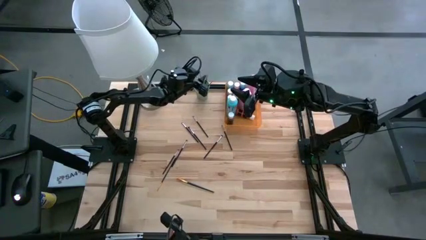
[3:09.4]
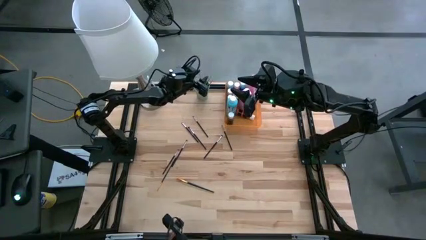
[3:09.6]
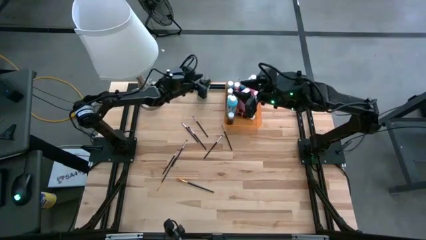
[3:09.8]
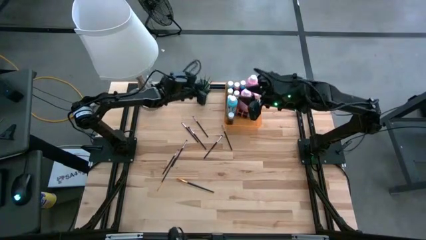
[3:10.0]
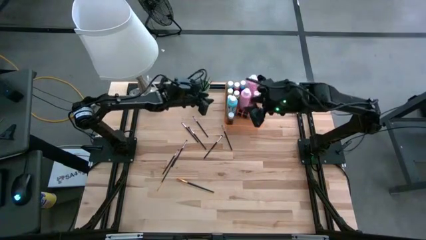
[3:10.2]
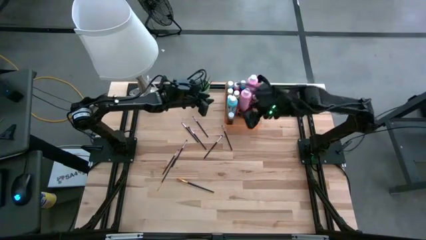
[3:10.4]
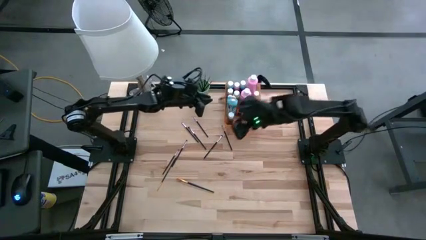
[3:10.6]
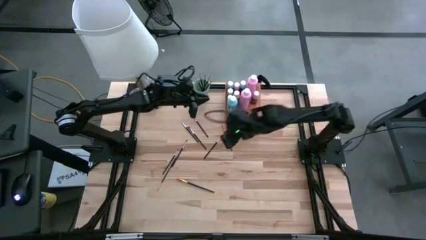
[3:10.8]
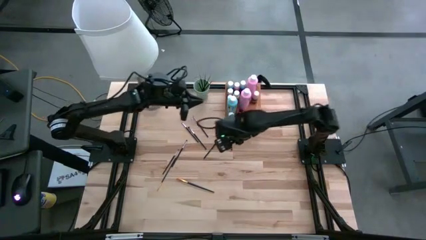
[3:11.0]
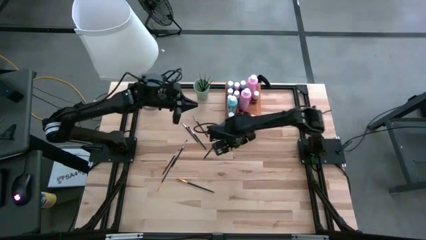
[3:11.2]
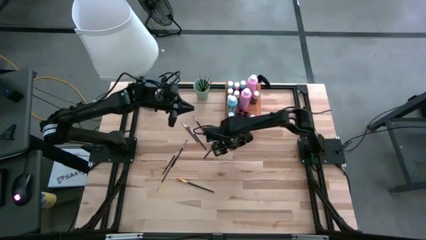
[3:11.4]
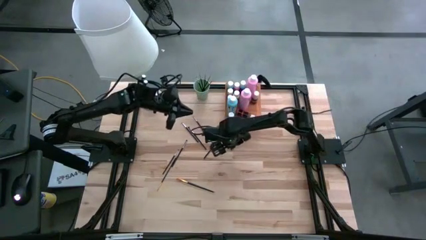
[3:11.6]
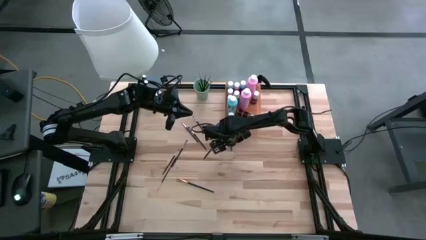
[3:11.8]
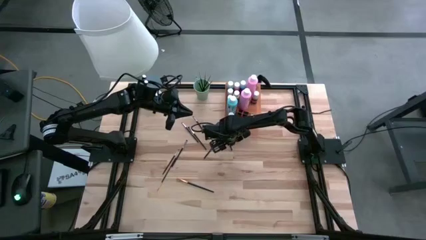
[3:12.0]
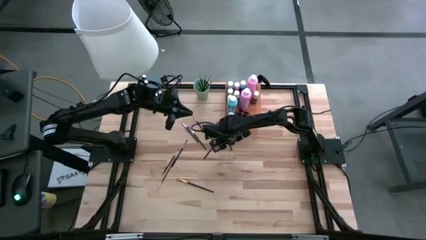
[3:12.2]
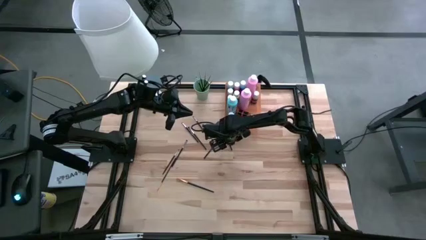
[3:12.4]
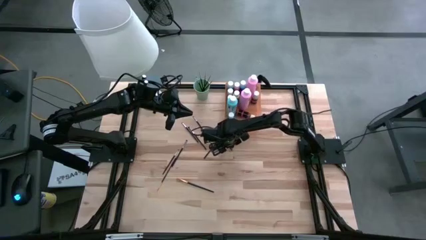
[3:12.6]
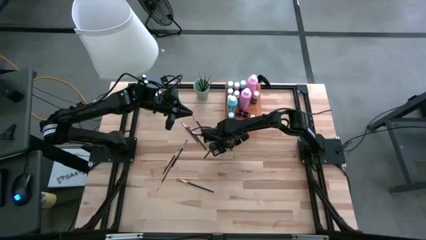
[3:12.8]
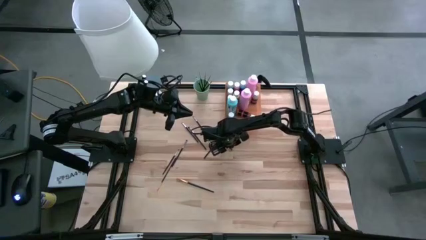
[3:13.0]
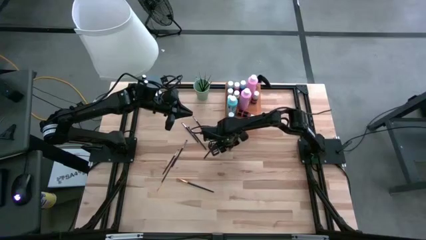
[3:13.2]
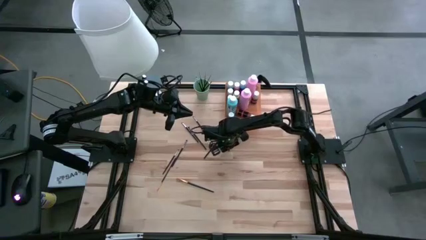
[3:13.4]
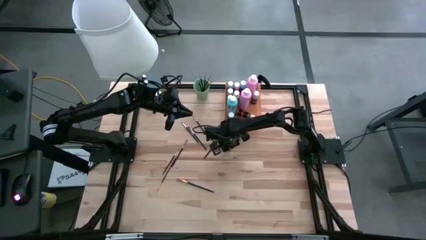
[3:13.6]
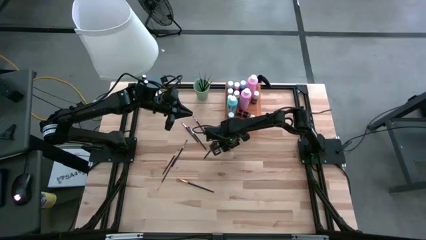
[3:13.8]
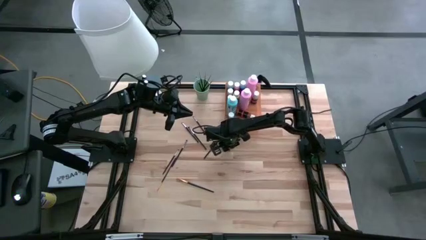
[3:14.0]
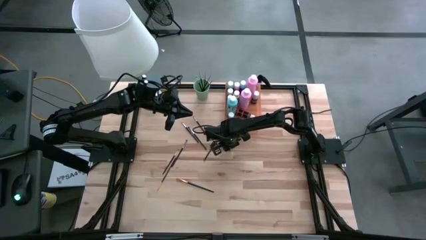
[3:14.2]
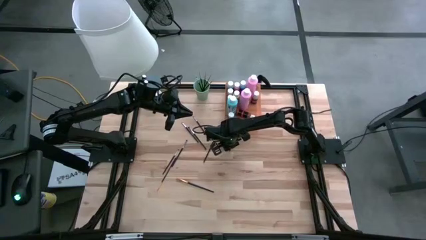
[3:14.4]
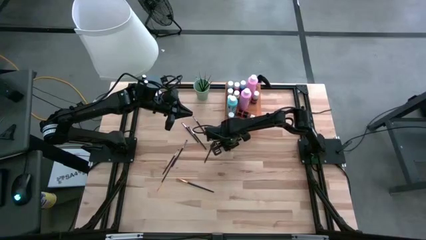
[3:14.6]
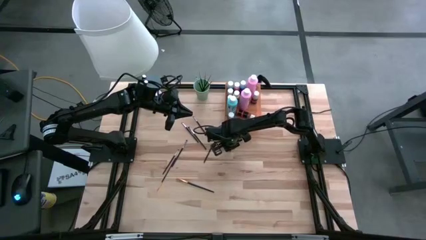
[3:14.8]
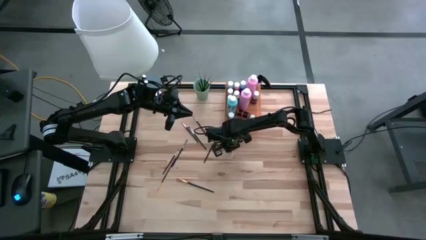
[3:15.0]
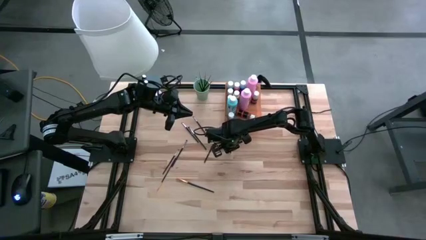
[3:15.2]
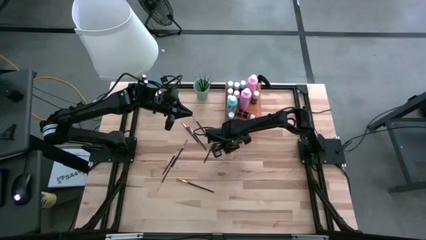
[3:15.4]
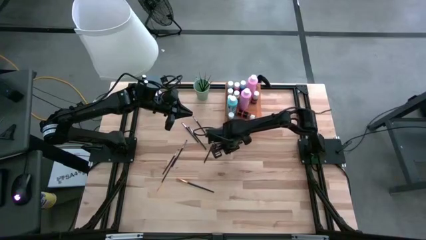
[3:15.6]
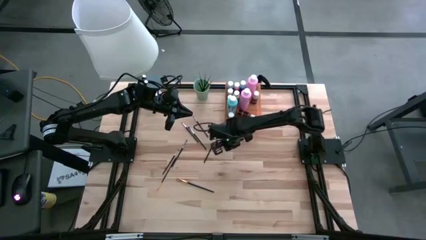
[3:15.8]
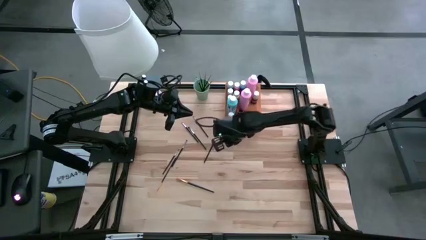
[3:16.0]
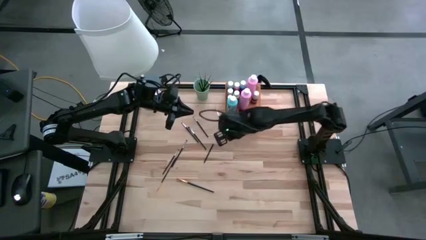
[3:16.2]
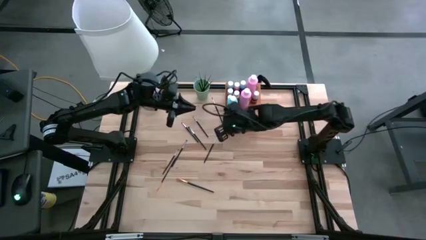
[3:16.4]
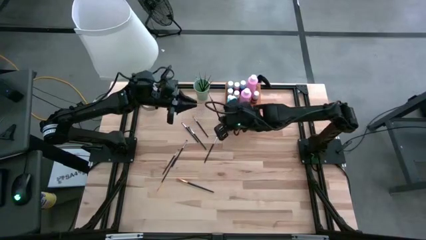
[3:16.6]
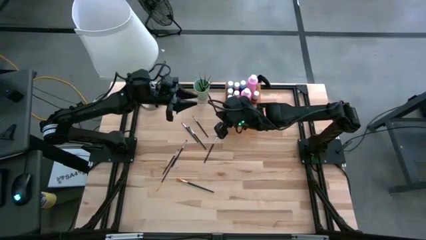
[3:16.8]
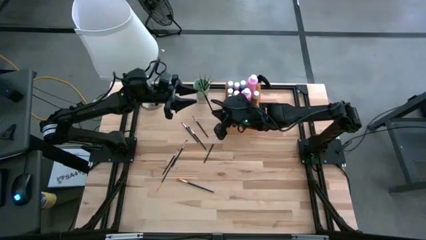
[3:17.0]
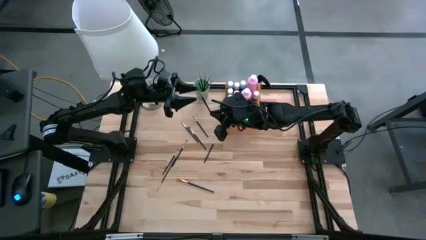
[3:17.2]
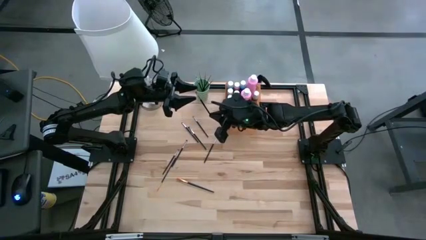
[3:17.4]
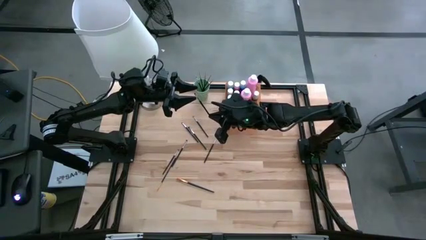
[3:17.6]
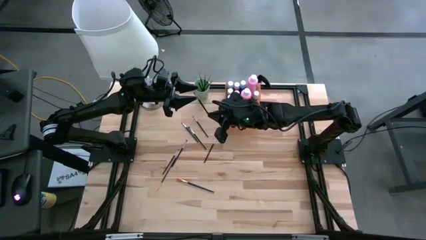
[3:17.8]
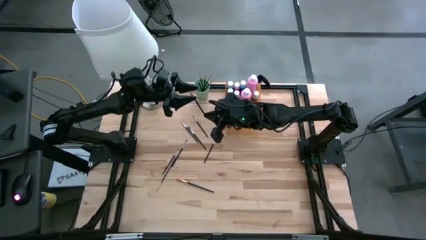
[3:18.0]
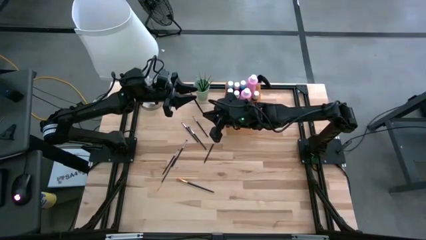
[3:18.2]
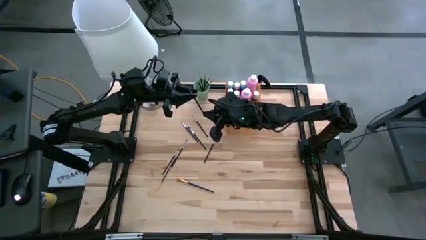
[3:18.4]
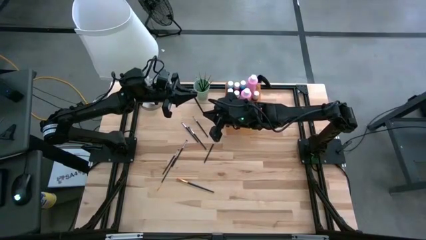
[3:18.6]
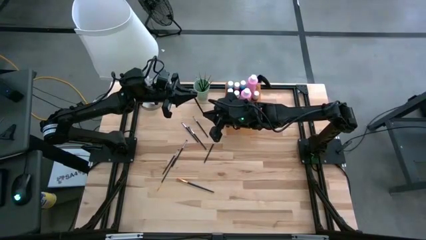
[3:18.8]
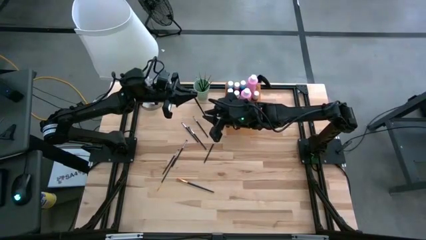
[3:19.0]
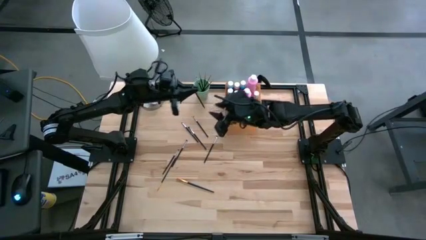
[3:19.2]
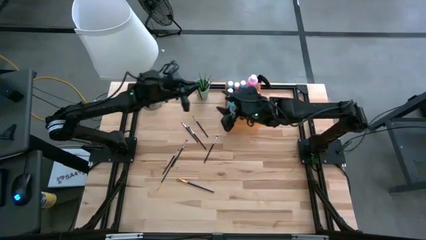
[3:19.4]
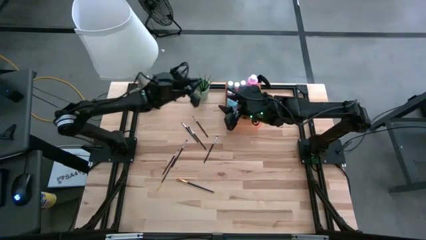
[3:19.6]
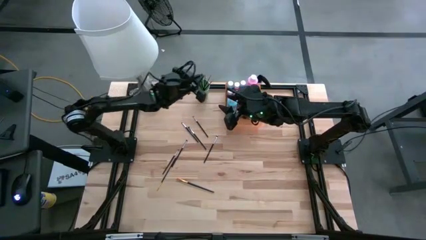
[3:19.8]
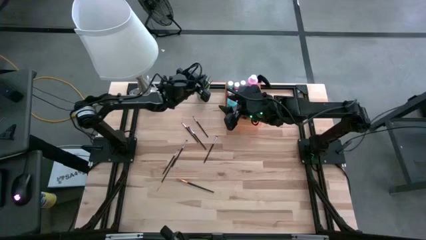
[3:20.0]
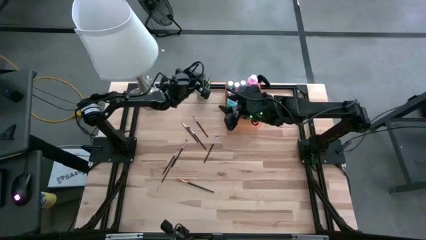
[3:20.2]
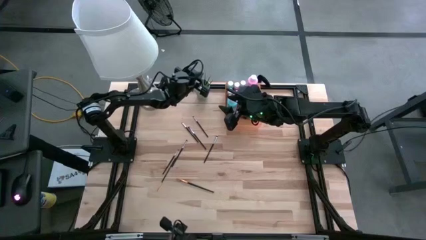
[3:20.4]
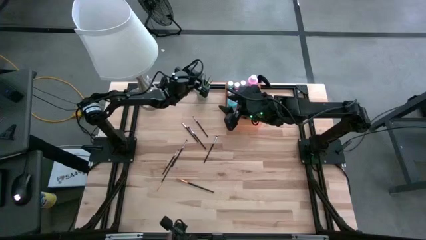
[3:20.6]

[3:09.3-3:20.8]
Task: Pick & Place Paint Supplies
Put the black paint brush into the green cup
